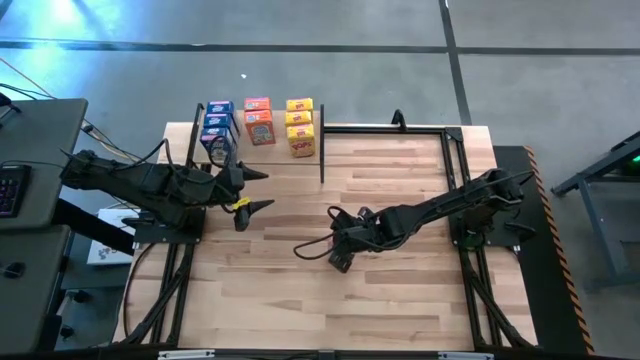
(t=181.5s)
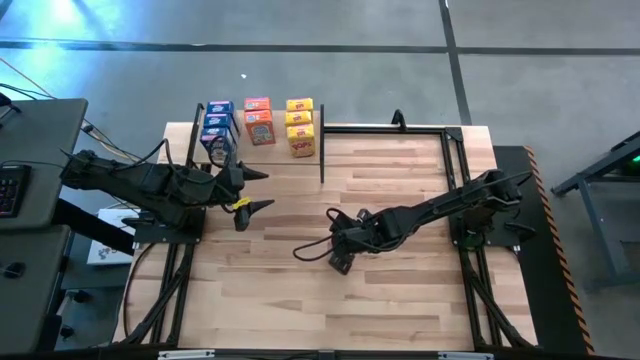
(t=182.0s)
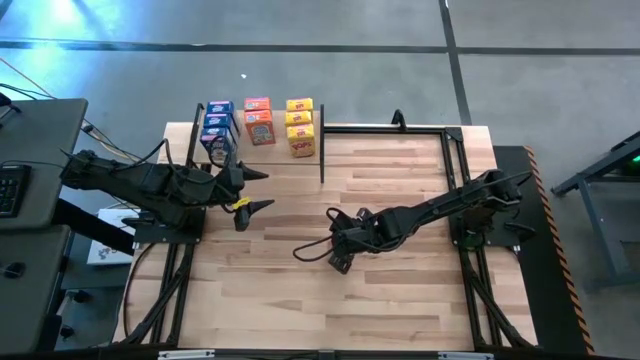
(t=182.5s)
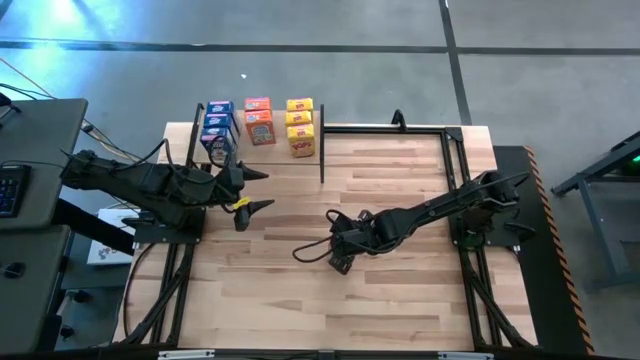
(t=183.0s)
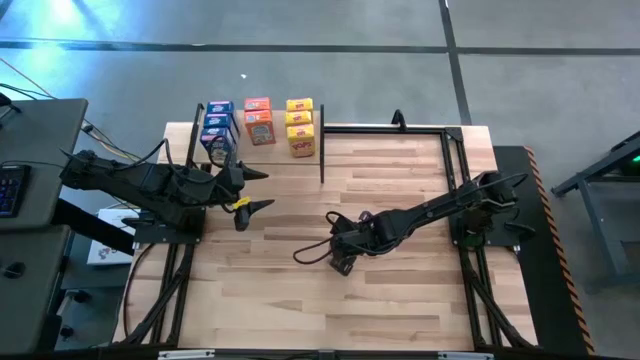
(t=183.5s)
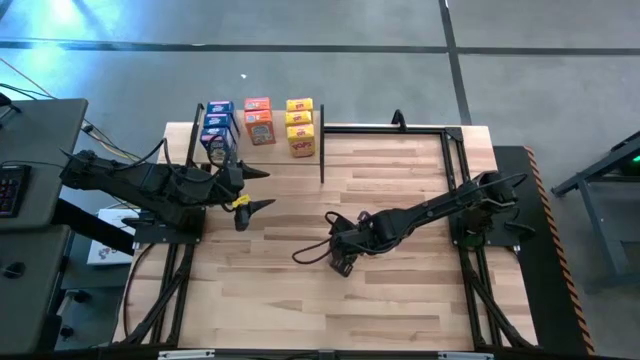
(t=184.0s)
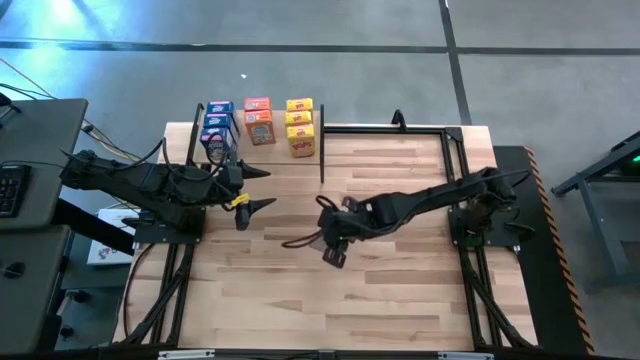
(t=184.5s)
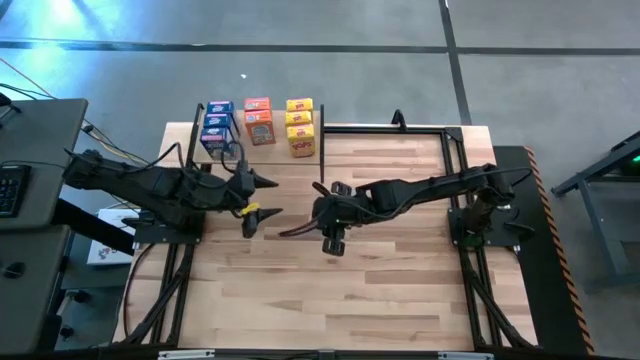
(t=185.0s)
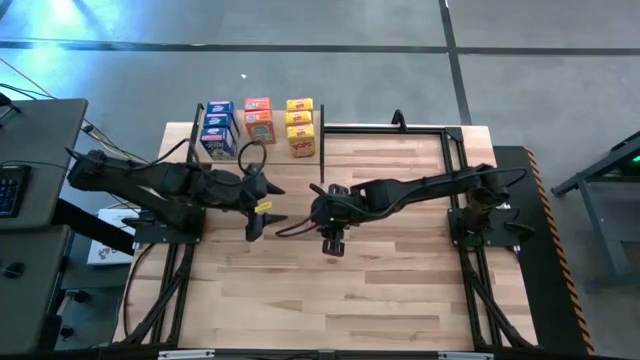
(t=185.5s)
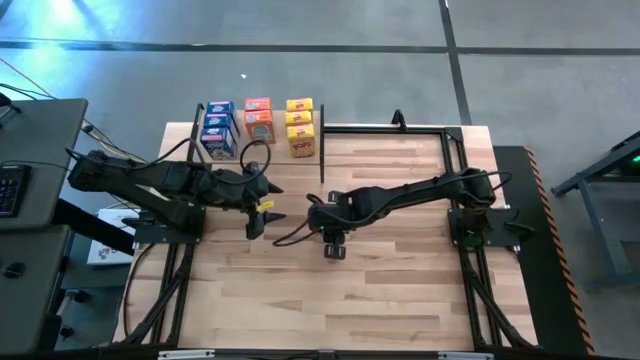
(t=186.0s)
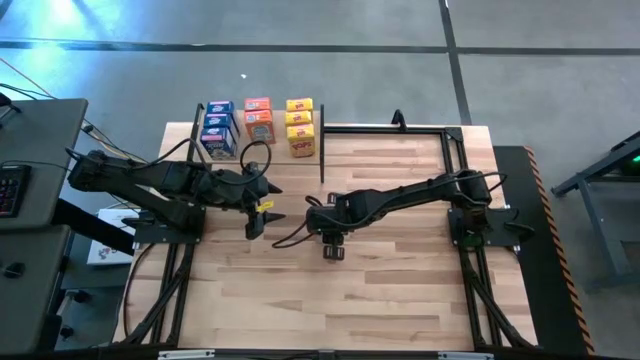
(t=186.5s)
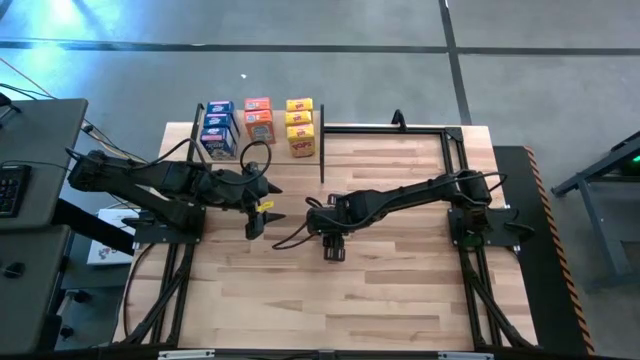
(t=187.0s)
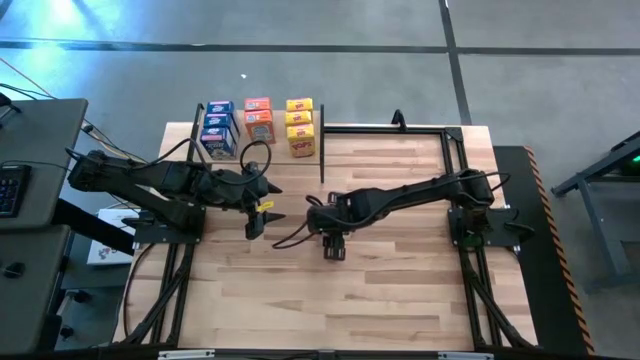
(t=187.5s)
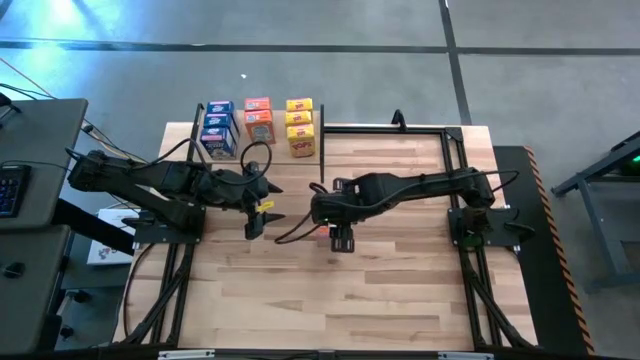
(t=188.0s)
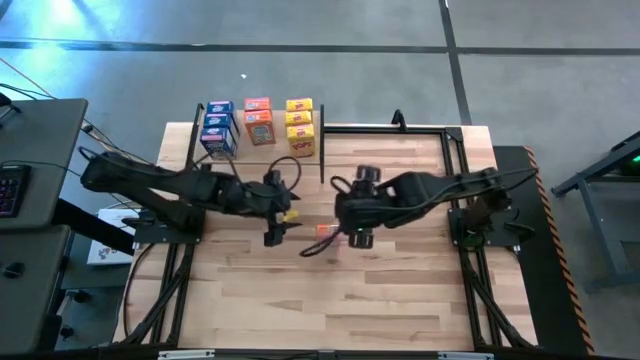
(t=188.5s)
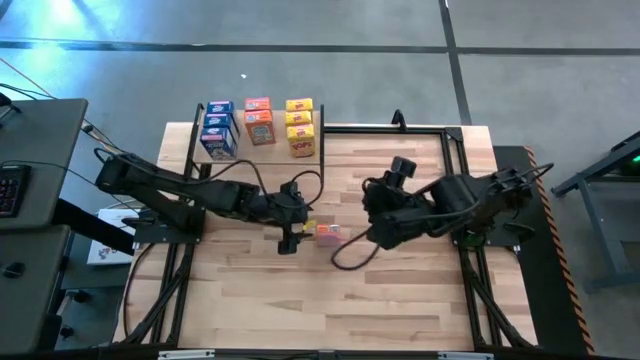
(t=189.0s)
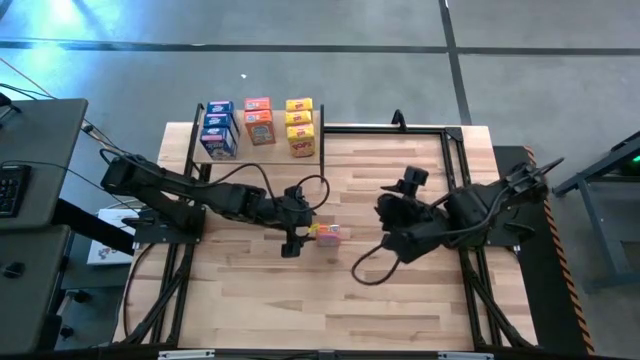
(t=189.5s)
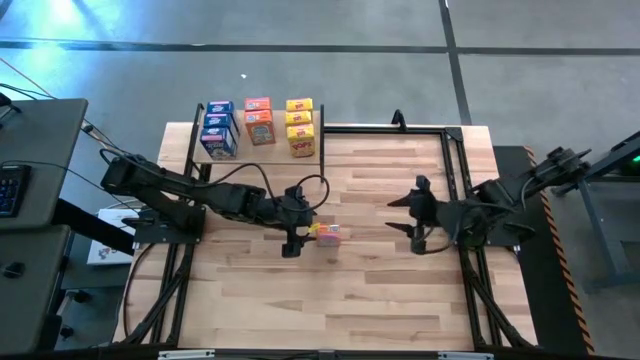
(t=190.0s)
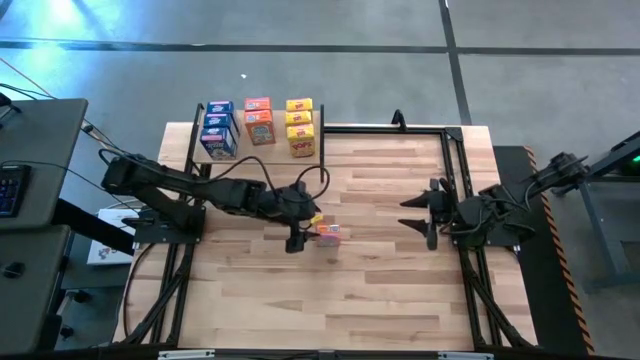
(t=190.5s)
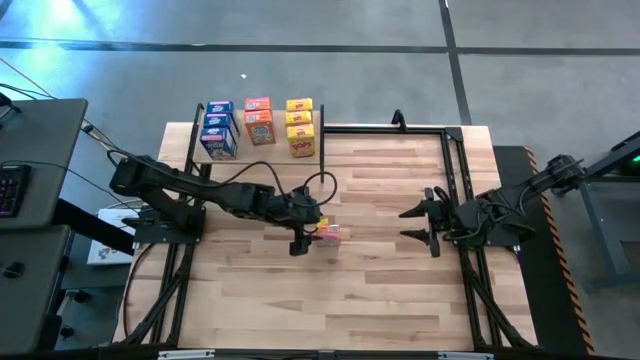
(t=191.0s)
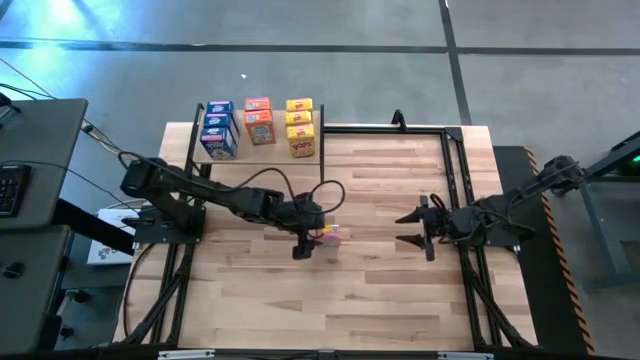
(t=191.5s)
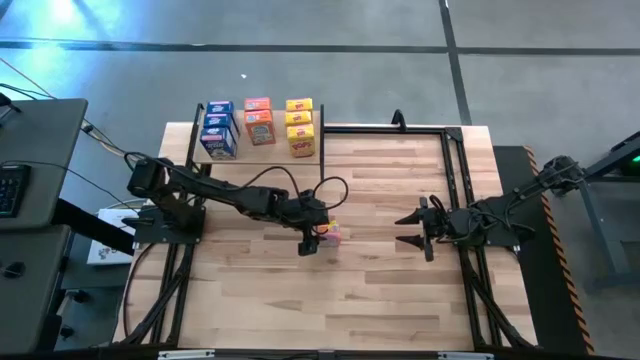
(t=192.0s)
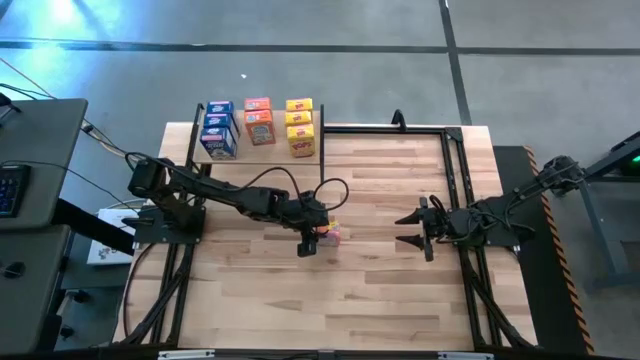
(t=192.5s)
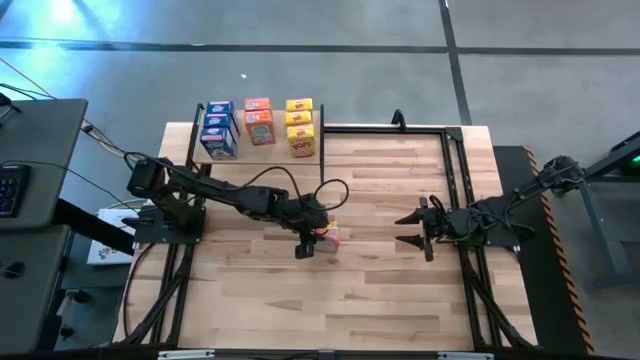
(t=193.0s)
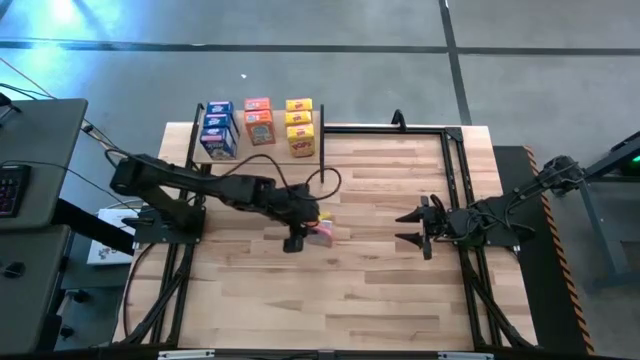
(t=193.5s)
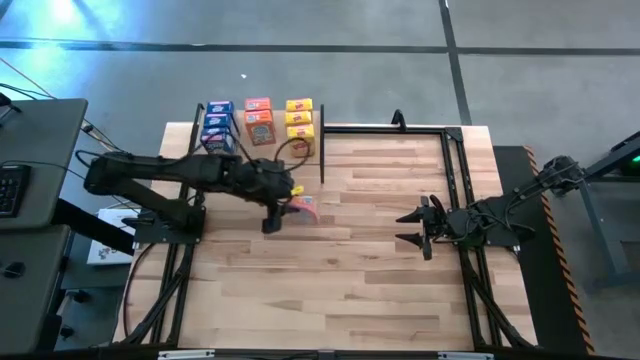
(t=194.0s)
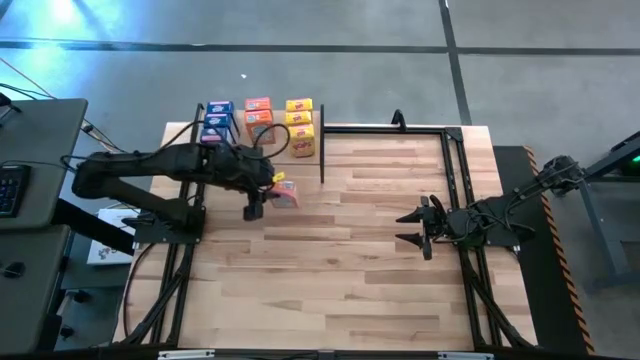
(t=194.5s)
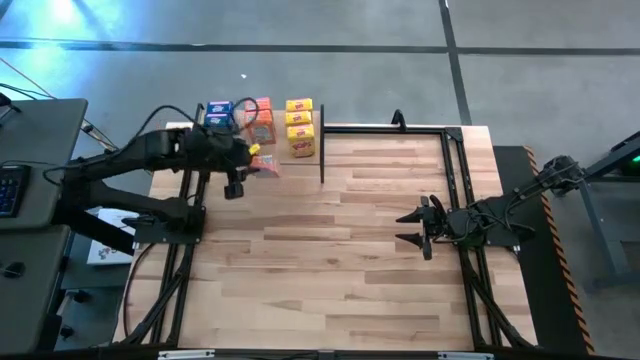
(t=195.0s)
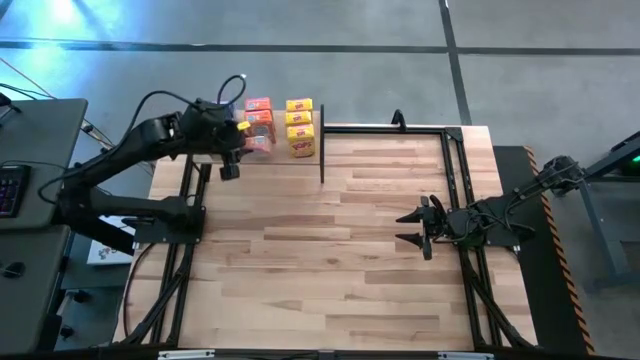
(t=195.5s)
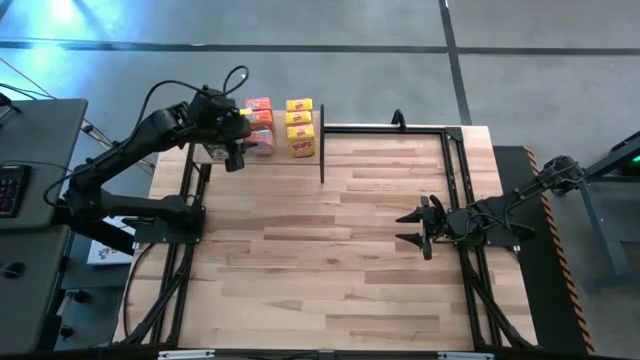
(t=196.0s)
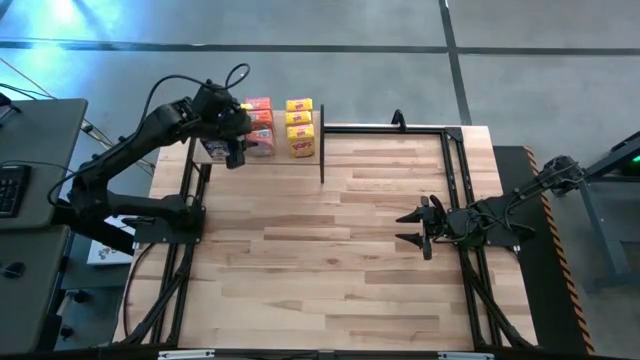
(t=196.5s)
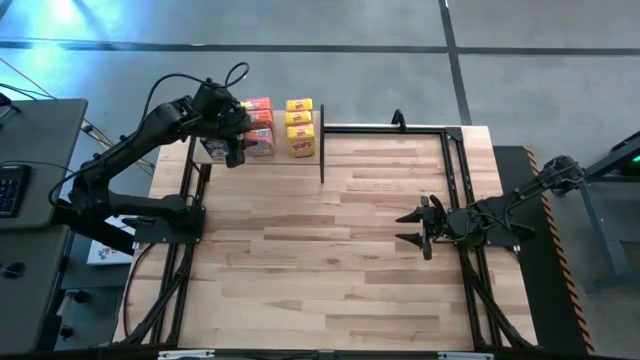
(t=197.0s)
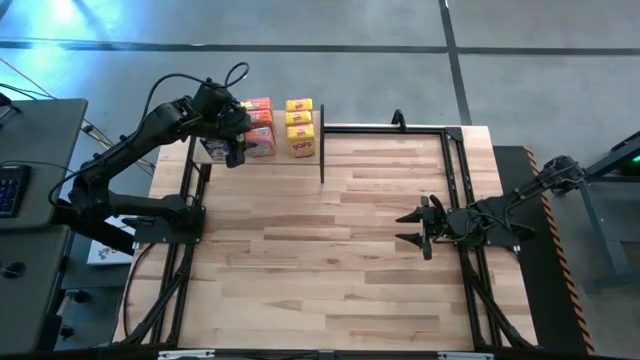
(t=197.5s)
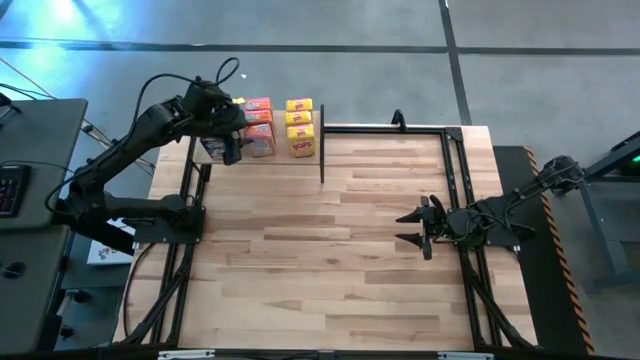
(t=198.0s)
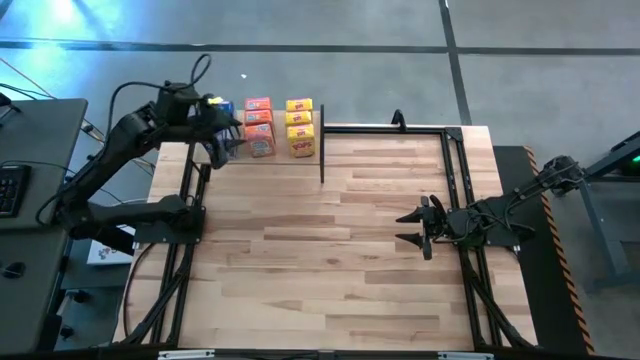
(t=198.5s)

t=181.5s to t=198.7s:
Task: Stack cereal on shelf
Put the orange cereal box on the shelf aligned with the other orange cereal boxes

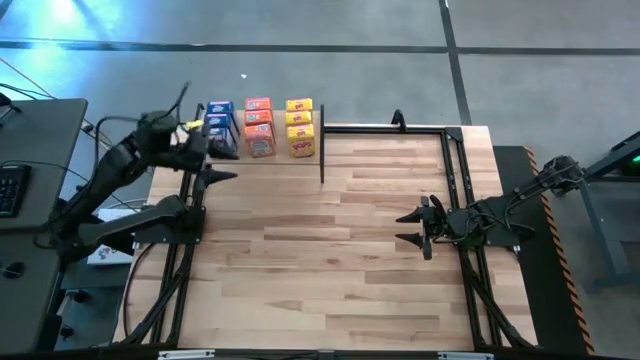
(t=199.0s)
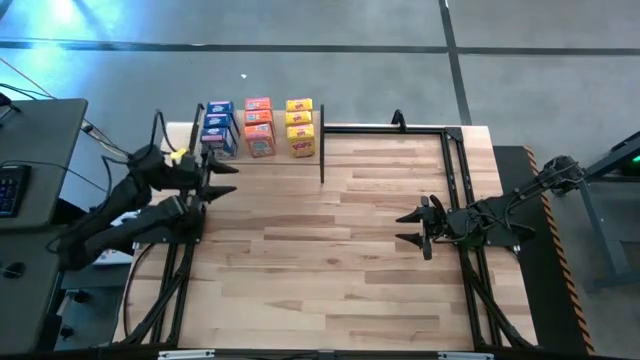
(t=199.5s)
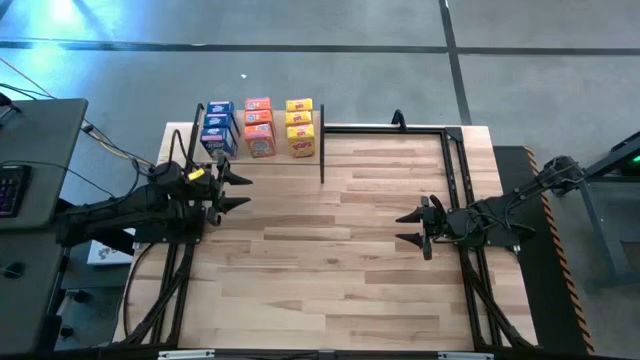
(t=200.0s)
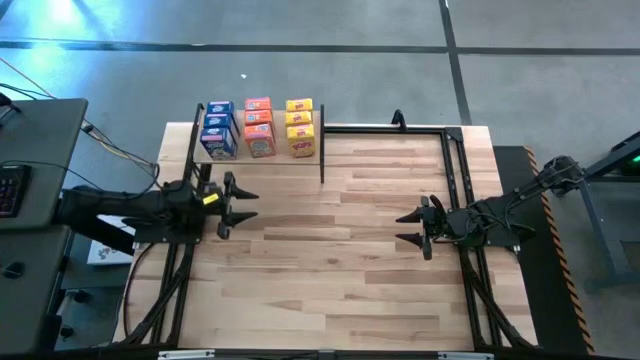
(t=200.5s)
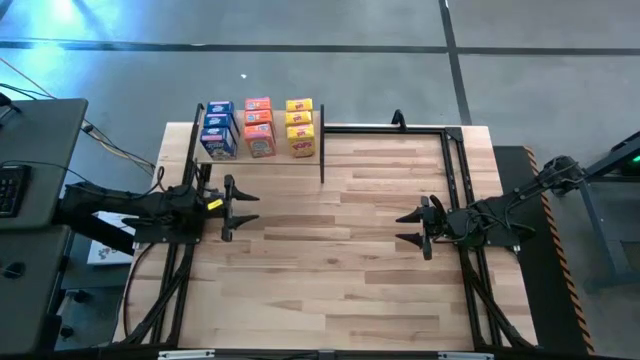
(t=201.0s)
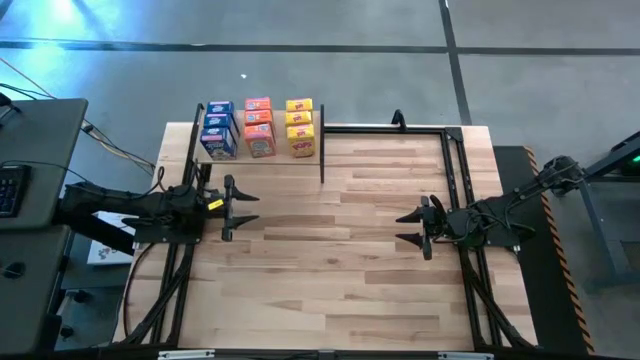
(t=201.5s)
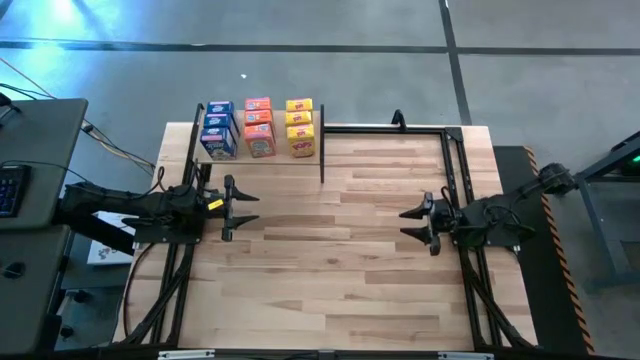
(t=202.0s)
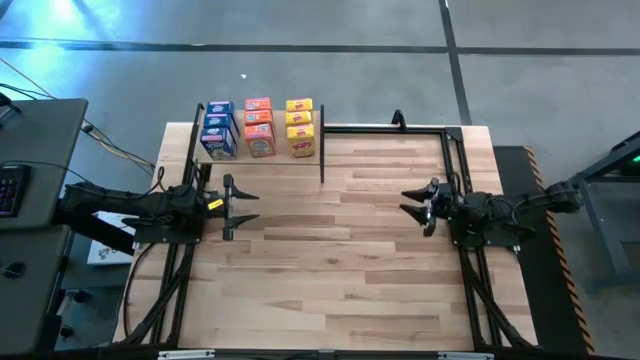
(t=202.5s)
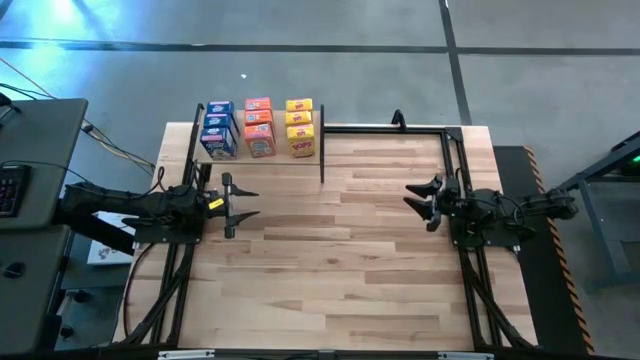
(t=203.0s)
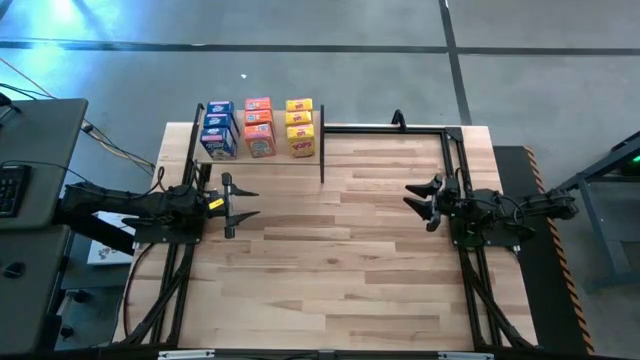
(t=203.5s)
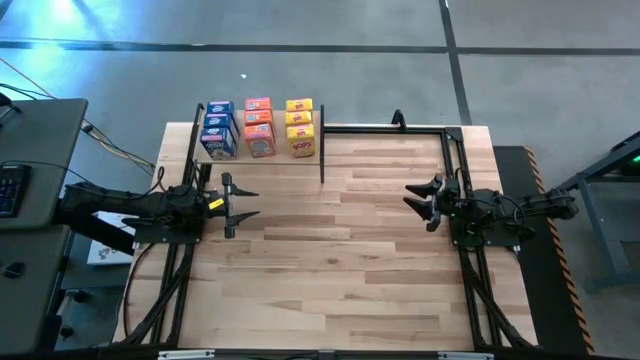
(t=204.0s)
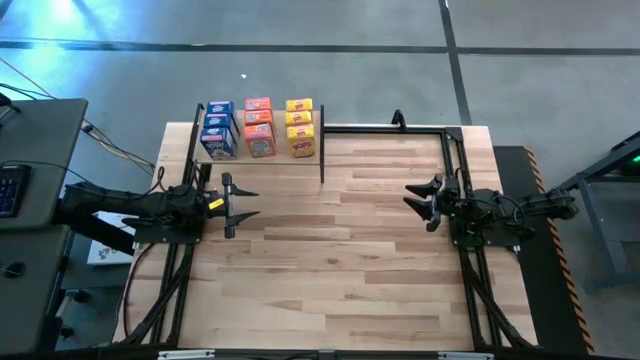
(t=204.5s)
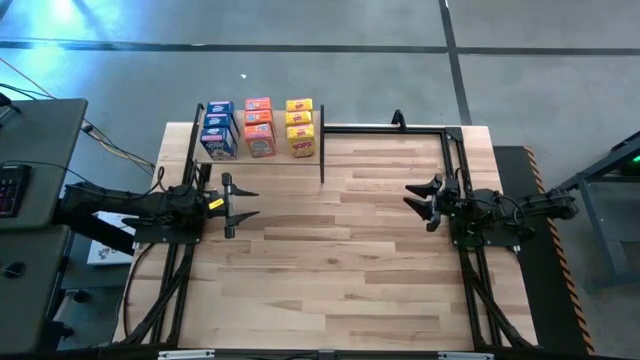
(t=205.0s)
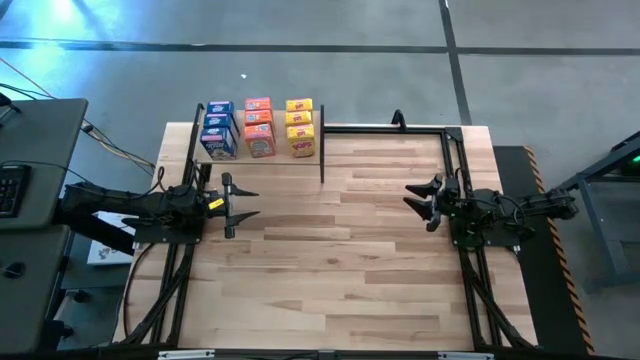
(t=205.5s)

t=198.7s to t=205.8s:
Return to Home Position
